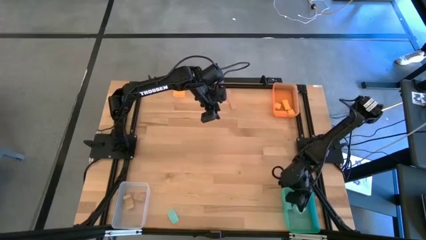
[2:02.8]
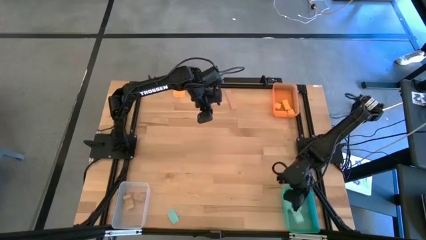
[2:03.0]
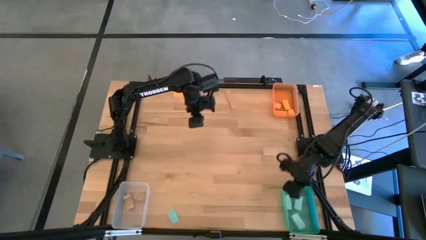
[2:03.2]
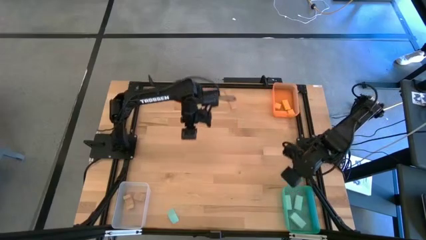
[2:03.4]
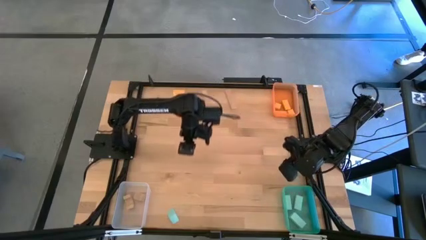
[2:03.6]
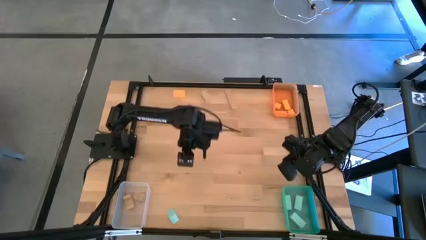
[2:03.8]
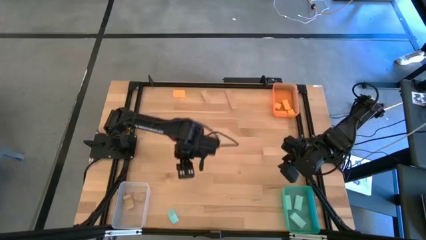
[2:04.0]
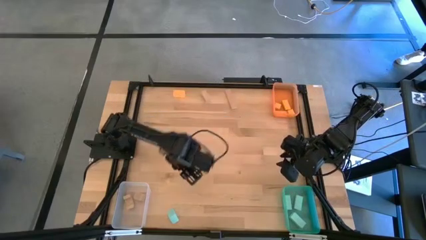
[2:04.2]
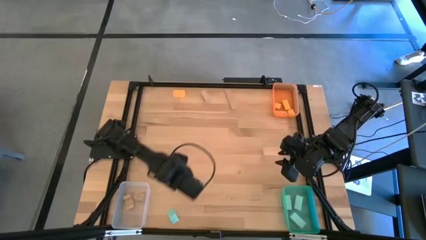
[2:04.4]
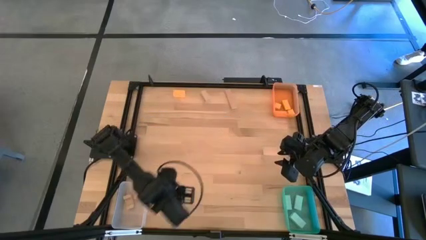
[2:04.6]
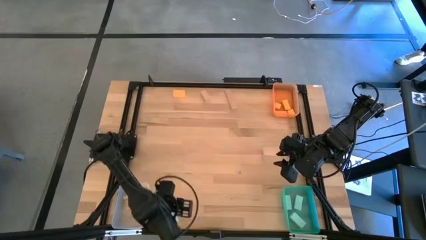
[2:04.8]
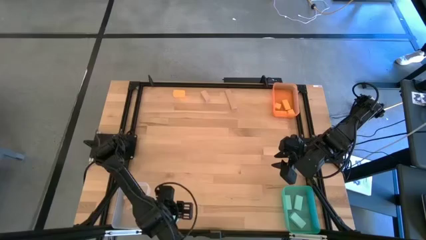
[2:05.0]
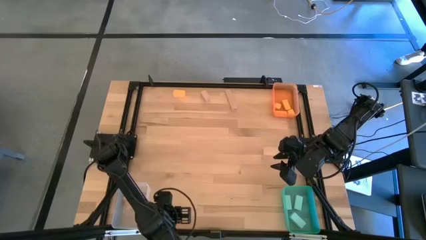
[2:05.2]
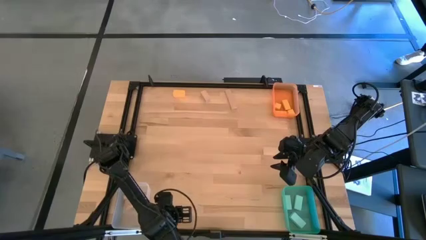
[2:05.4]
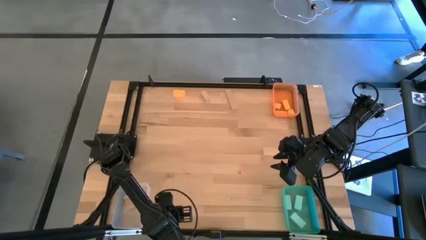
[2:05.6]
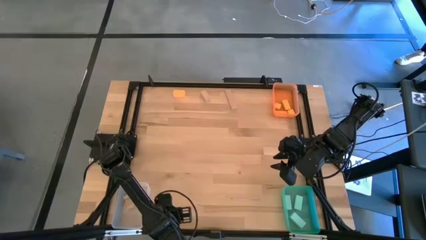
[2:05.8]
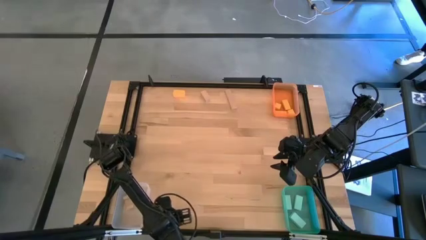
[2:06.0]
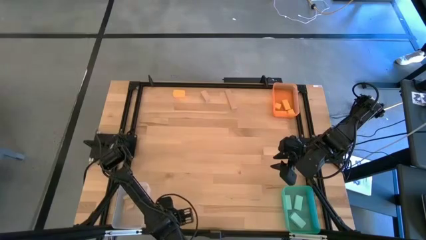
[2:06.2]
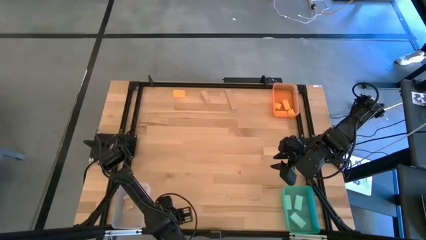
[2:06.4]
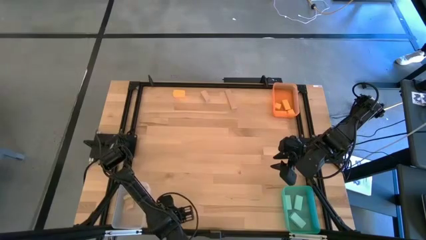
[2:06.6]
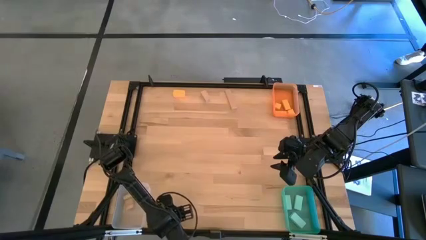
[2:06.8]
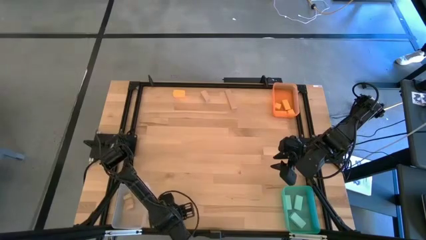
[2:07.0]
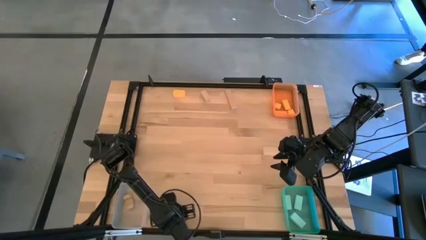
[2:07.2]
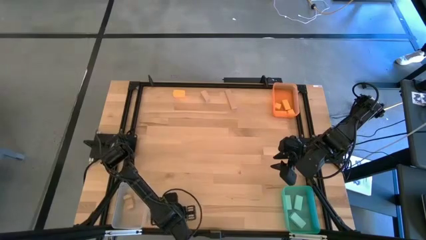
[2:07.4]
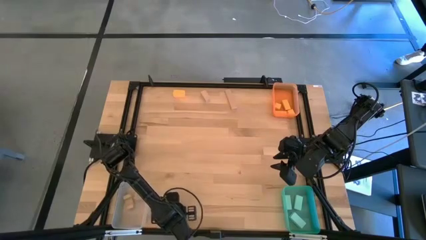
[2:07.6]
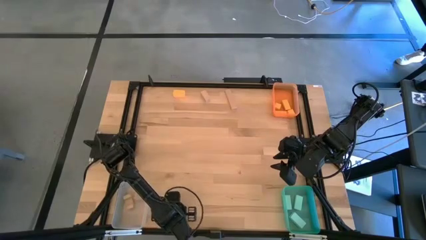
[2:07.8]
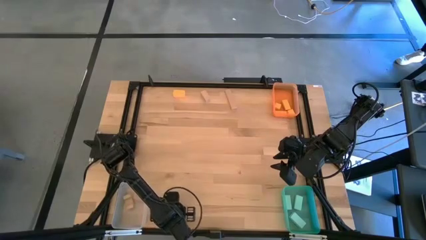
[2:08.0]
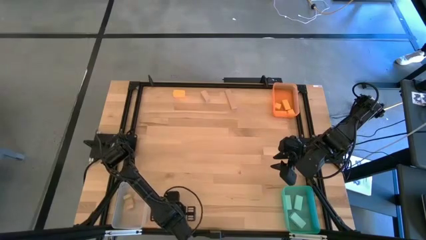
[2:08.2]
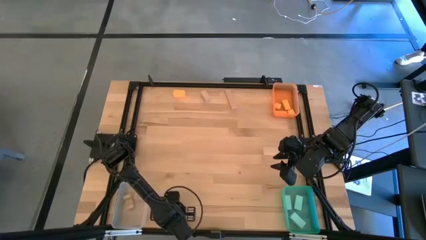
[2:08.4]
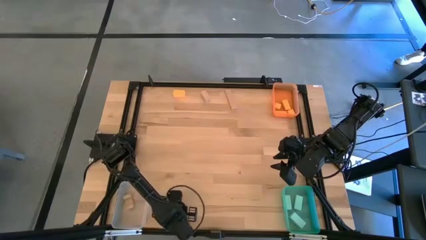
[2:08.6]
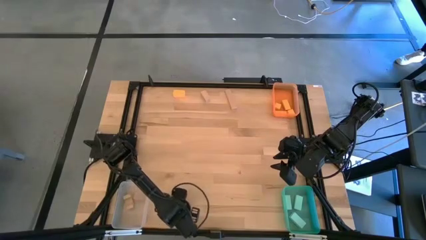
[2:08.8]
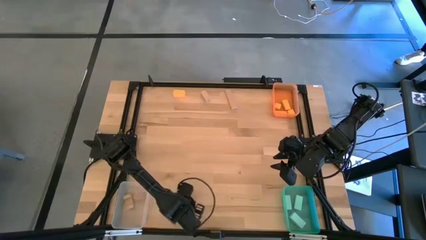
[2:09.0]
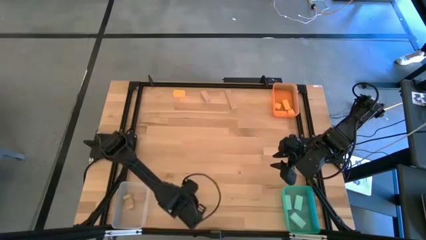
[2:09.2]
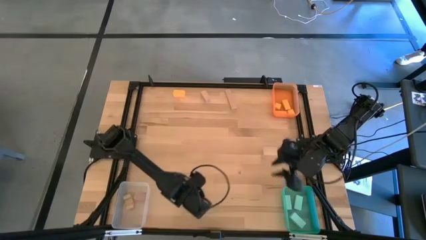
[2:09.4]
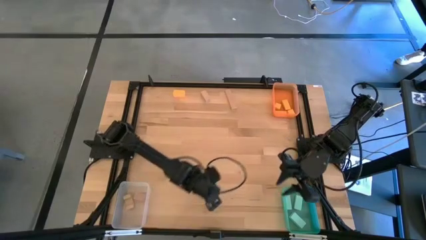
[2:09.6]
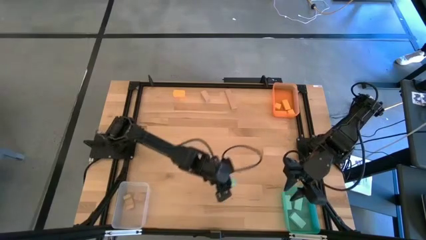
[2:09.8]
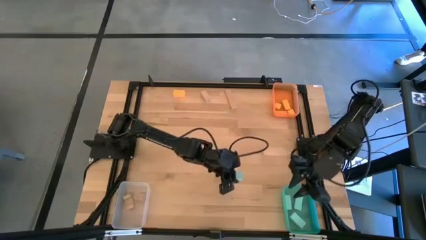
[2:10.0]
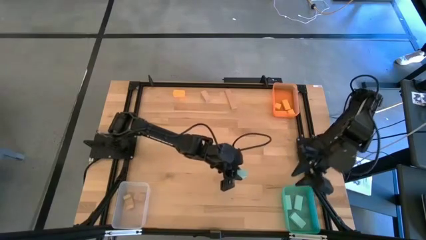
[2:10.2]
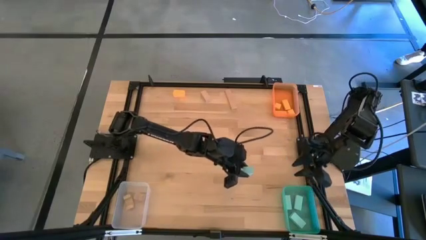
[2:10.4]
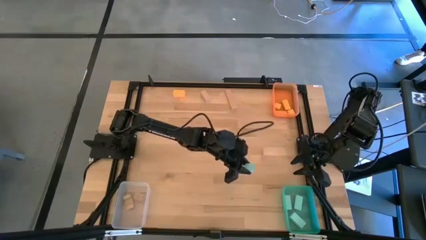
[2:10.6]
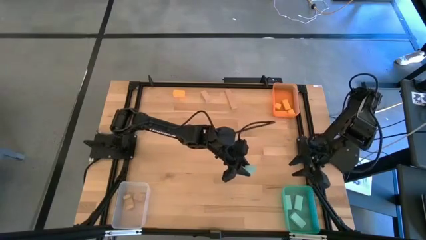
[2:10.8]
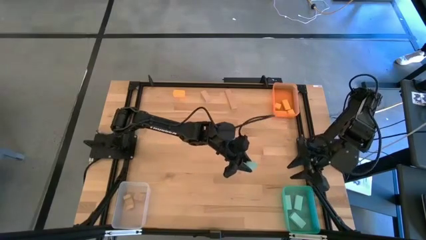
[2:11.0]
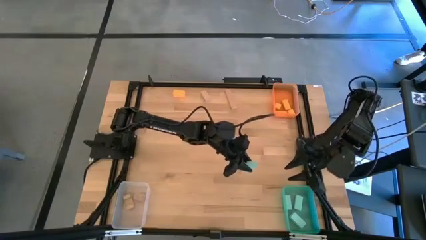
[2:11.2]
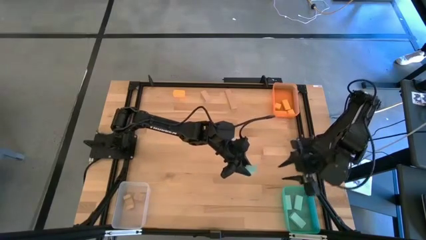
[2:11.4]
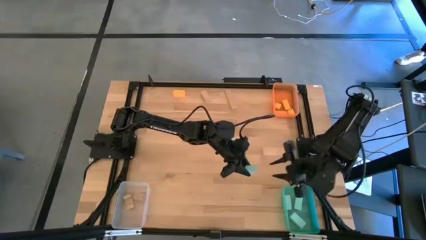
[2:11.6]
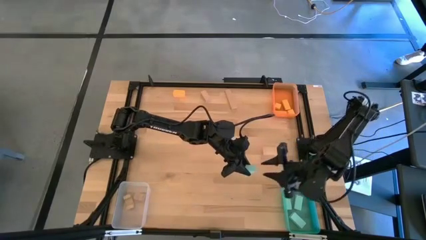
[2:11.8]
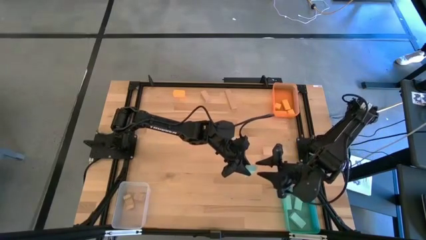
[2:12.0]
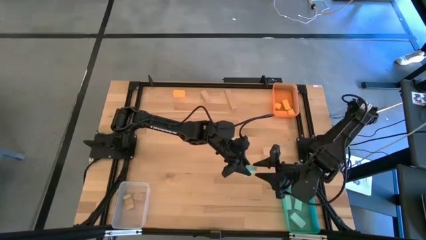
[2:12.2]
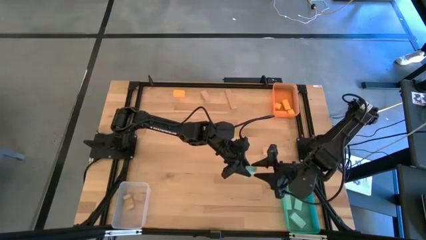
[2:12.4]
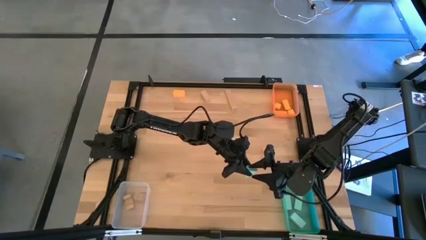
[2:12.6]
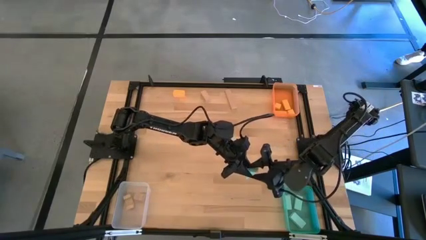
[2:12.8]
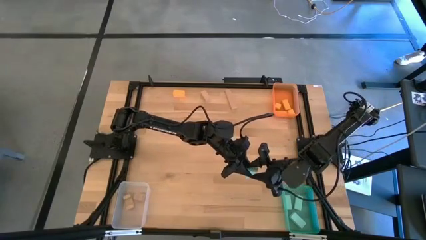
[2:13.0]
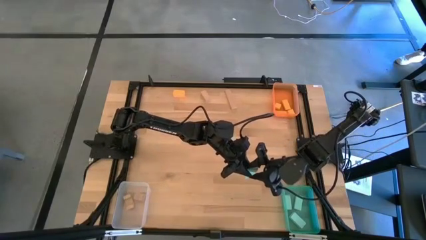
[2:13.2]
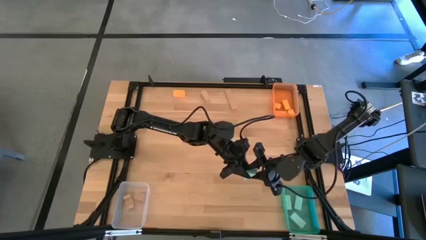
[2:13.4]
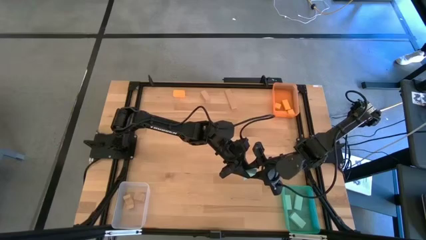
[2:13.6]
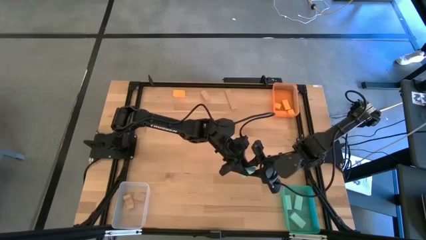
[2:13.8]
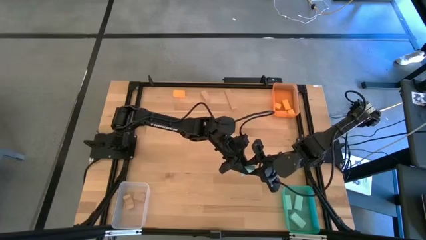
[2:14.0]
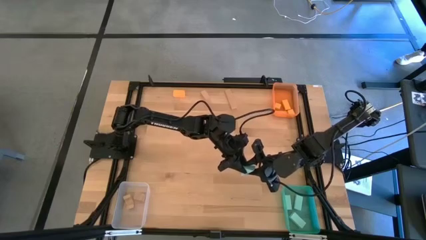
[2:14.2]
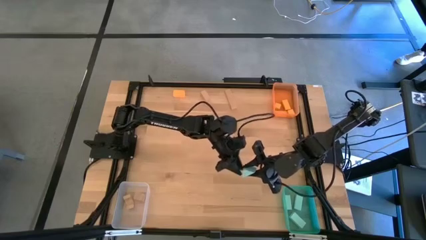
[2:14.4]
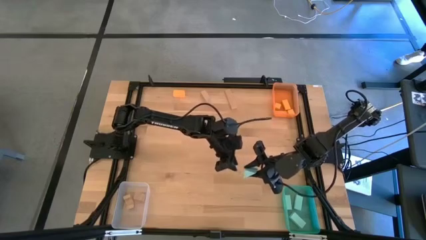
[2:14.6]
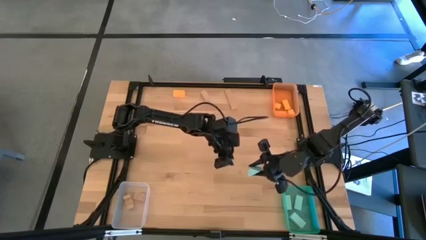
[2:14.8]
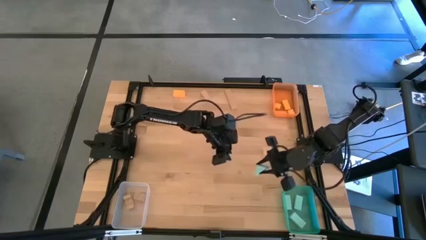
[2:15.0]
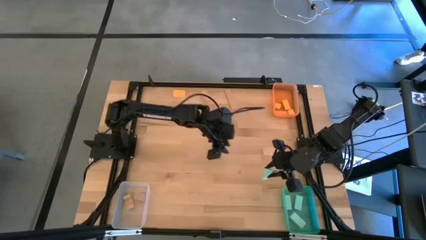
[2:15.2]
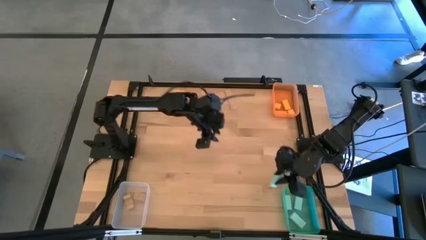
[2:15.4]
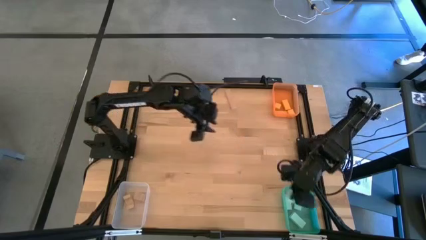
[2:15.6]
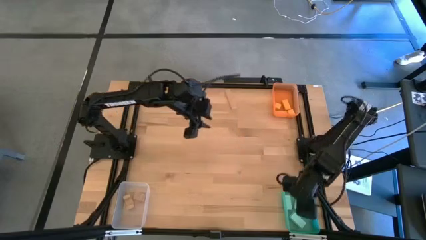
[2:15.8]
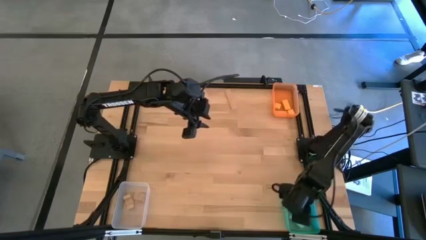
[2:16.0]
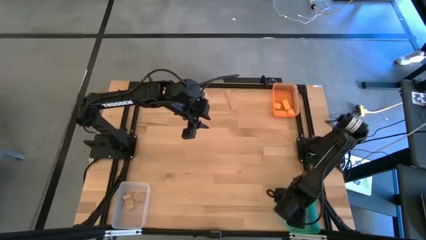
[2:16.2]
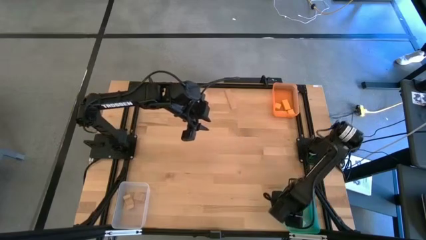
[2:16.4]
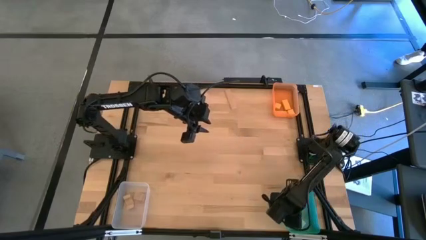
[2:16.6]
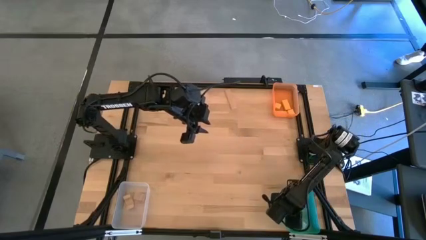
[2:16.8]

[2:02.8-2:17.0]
Task: Sort & place blocks by color
Put the blue block into the green bin

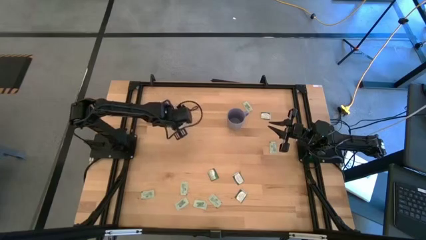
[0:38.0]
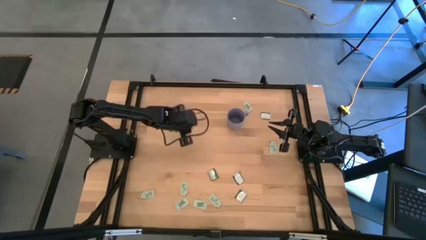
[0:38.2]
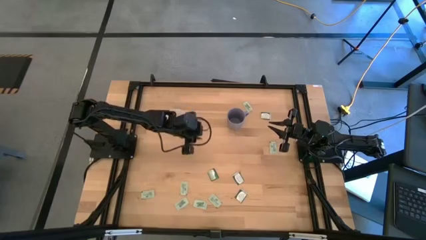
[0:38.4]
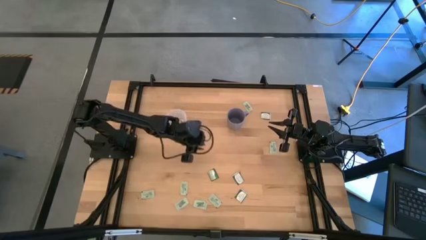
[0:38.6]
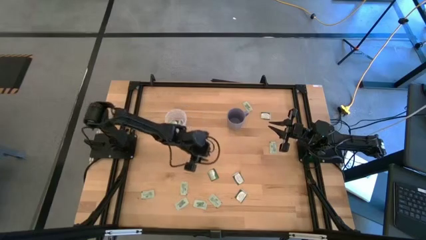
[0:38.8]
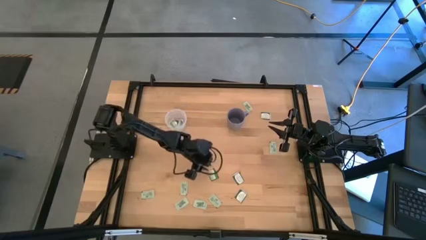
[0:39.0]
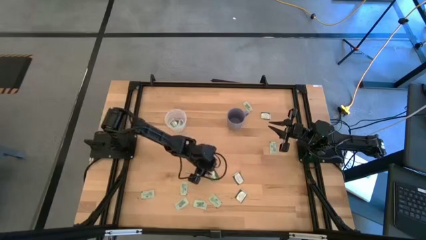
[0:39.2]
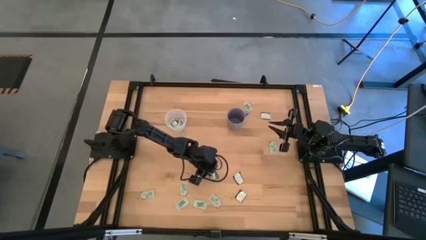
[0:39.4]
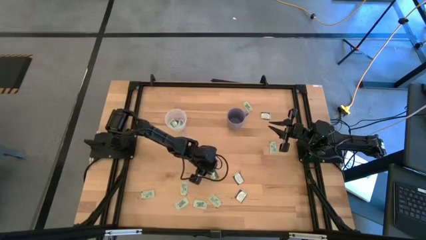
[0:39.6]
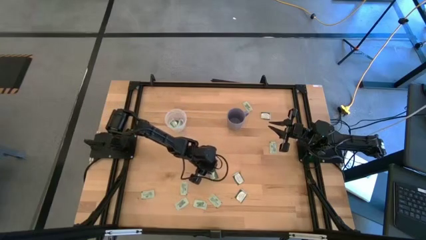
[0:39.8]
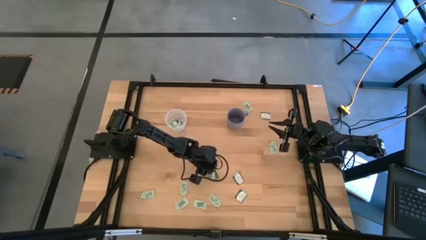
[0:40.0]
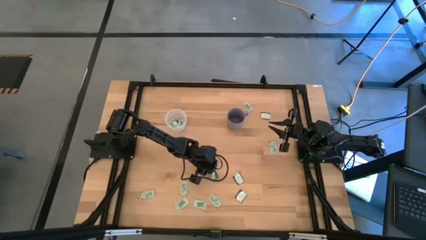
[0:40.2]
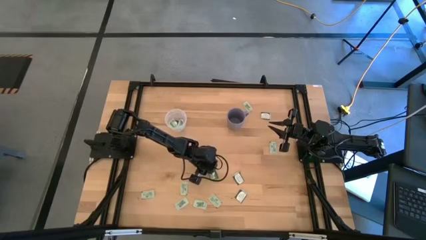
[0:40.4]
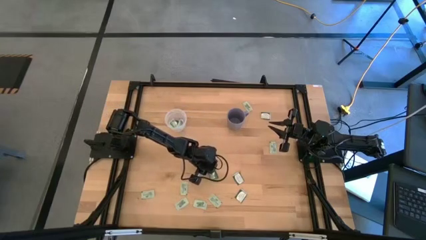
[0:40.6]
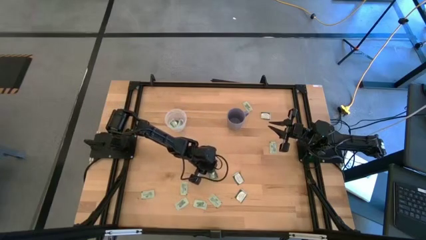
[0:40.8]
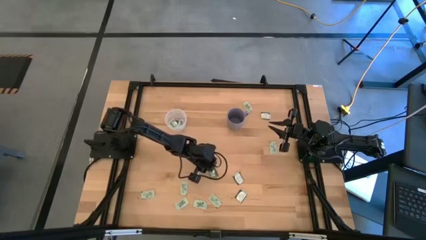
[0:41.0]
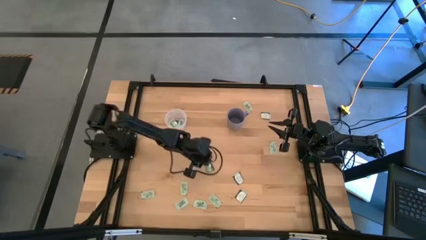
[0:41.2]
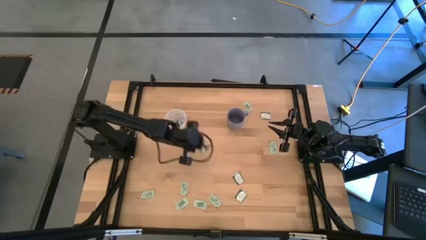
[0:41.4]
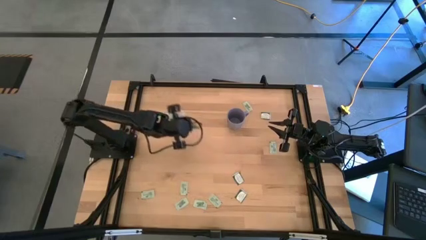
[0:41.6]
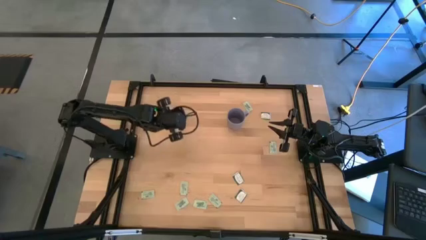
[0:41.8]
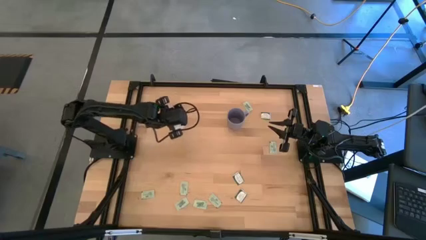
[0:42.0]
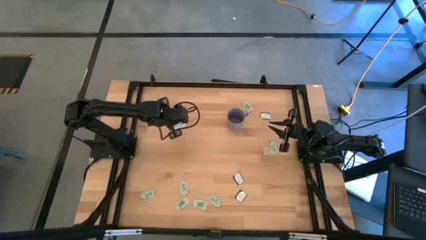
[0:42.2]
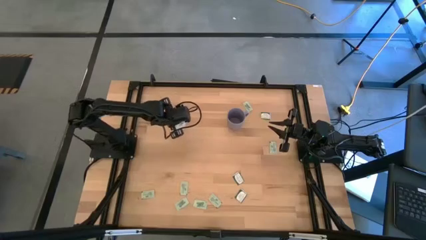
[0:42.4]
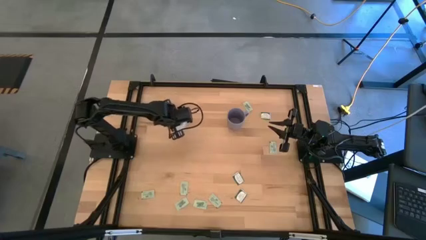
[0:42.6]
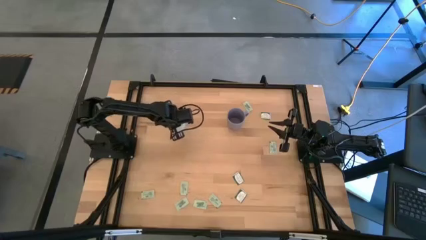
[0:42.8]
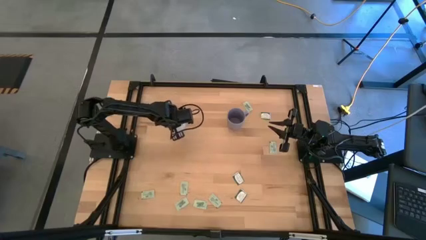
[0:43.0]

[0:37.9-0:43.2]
Task: Pick and place Stevia / Truvia into bins
Put the green stevia packet into the transparent container
